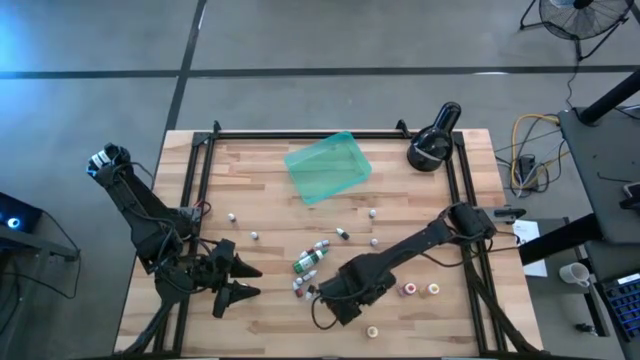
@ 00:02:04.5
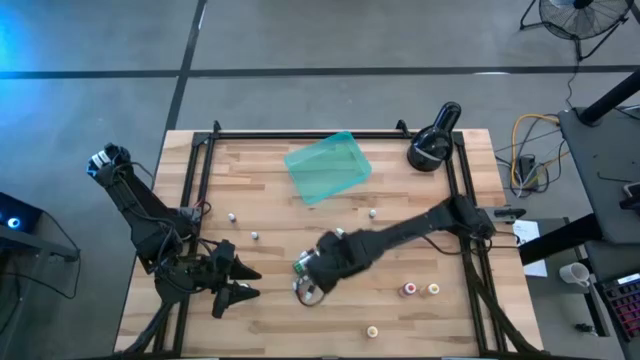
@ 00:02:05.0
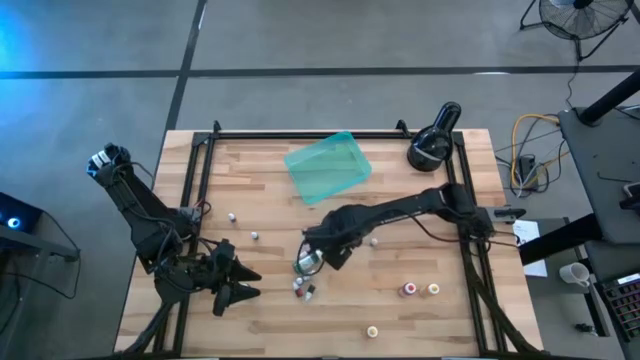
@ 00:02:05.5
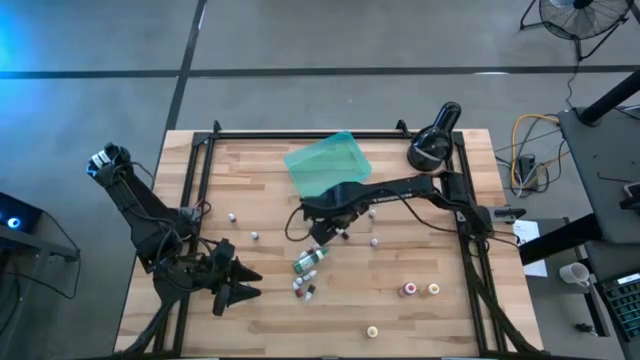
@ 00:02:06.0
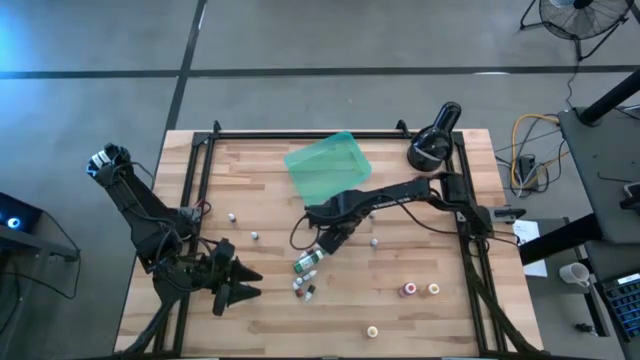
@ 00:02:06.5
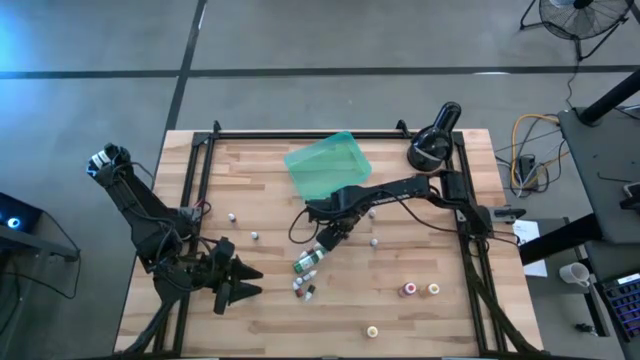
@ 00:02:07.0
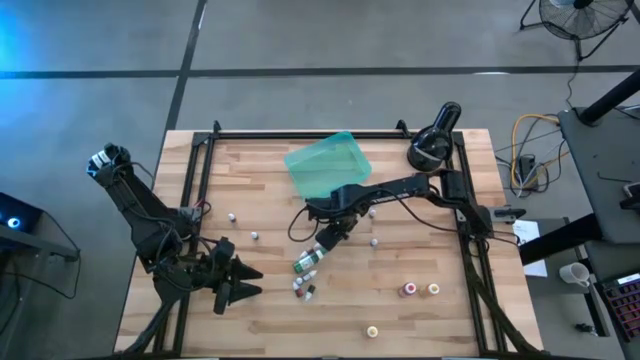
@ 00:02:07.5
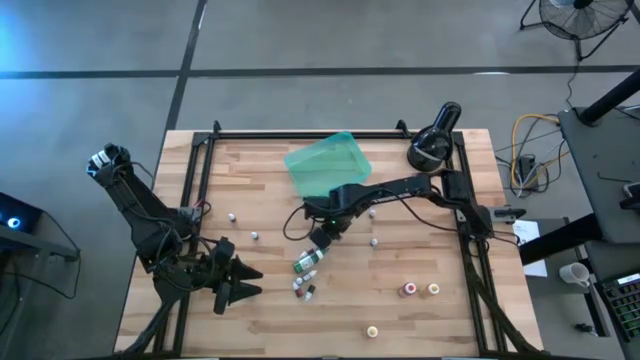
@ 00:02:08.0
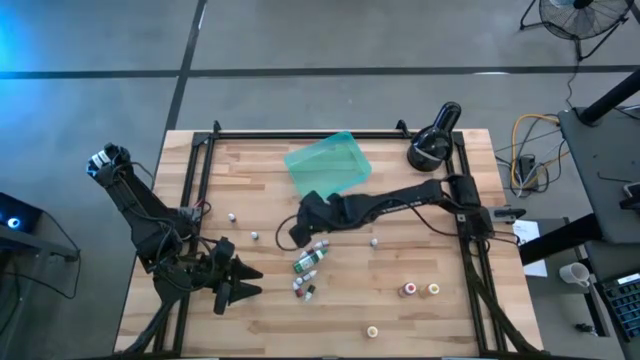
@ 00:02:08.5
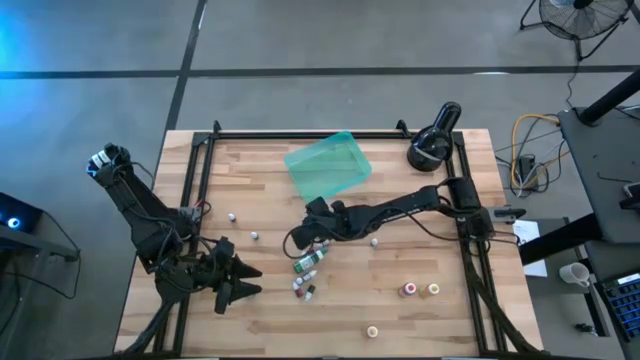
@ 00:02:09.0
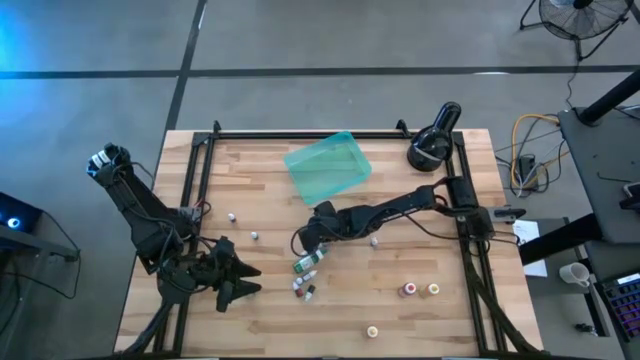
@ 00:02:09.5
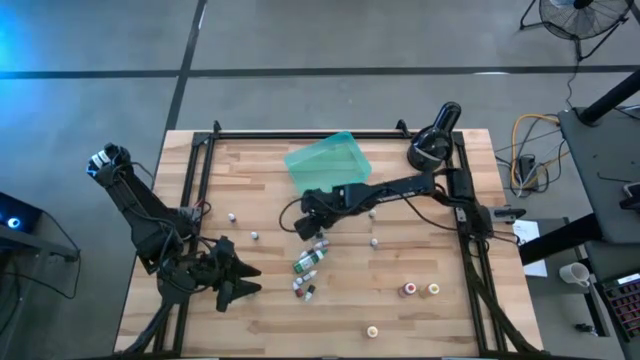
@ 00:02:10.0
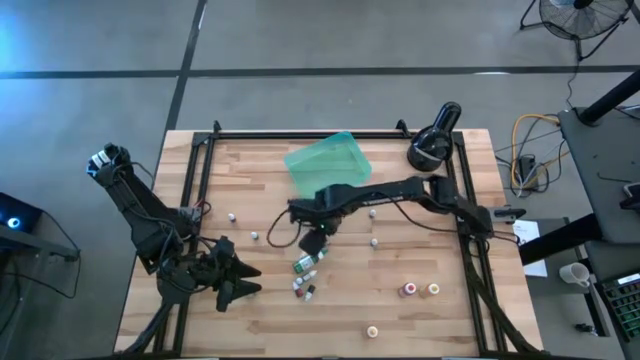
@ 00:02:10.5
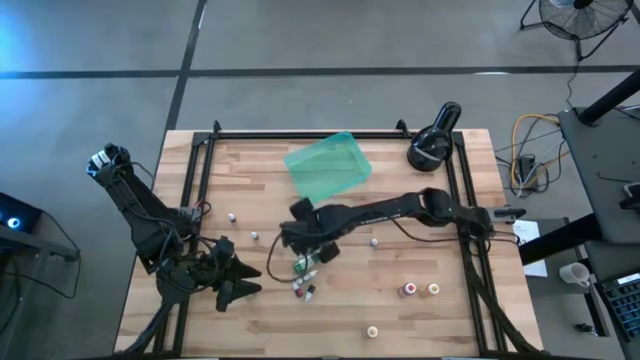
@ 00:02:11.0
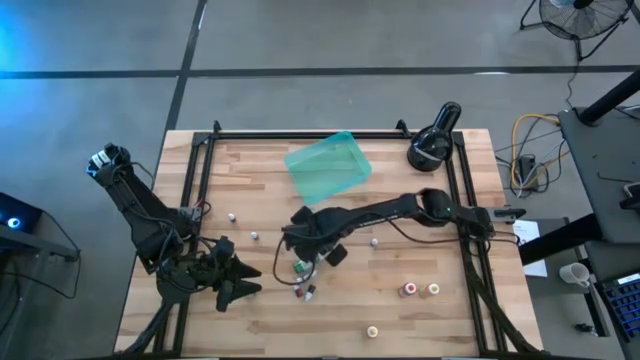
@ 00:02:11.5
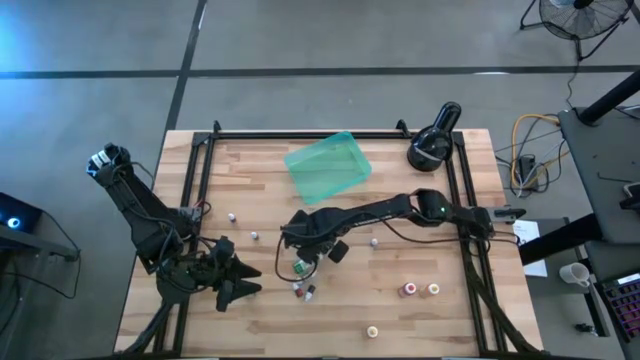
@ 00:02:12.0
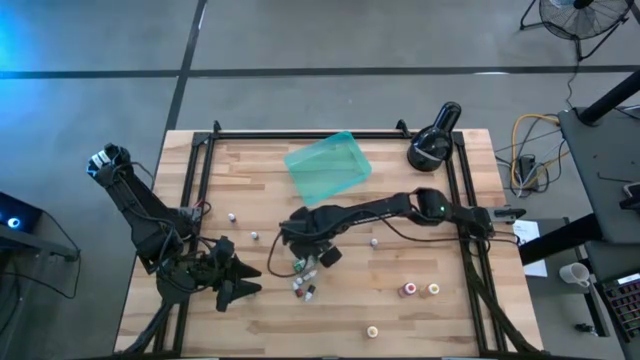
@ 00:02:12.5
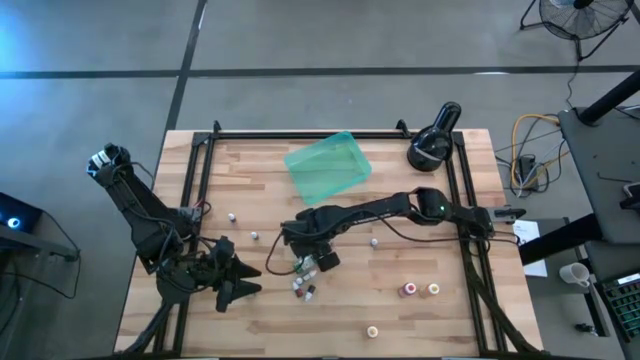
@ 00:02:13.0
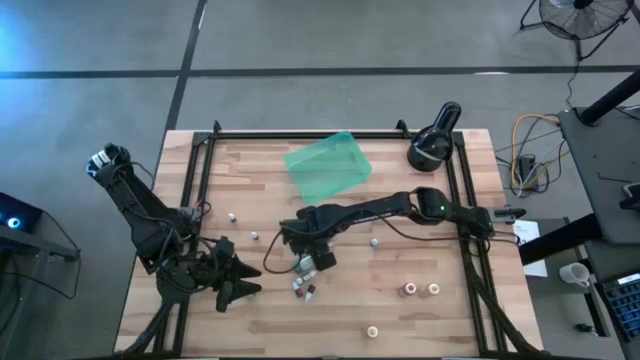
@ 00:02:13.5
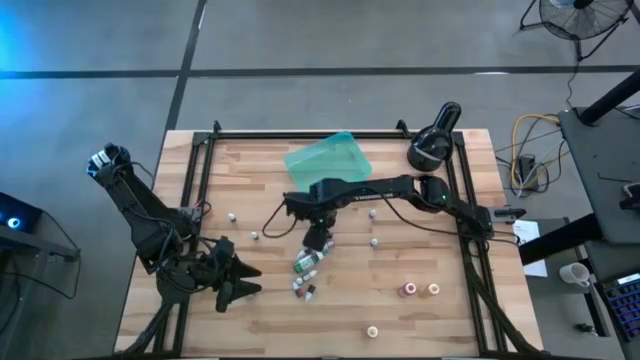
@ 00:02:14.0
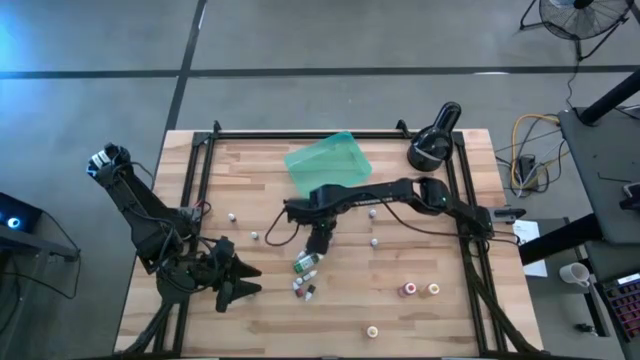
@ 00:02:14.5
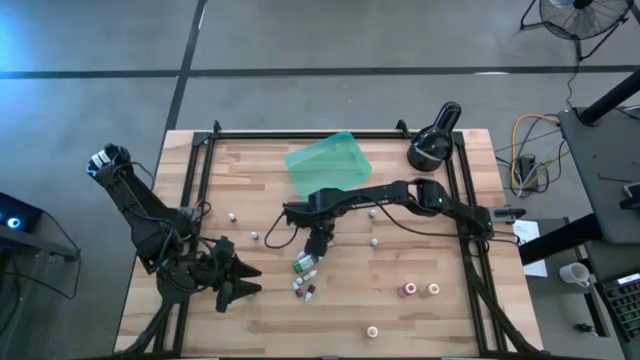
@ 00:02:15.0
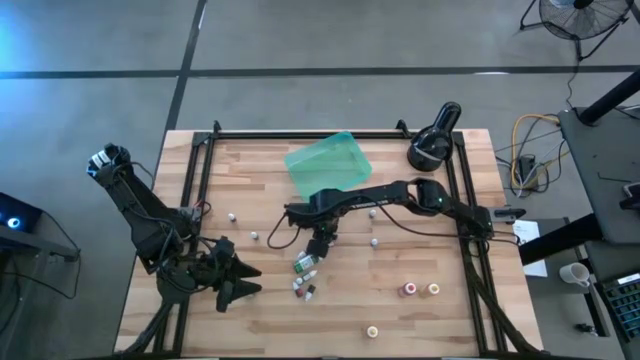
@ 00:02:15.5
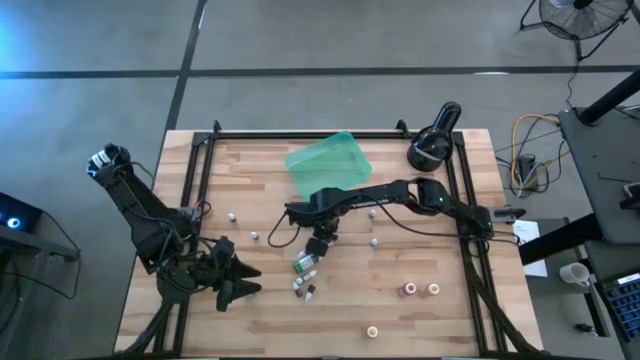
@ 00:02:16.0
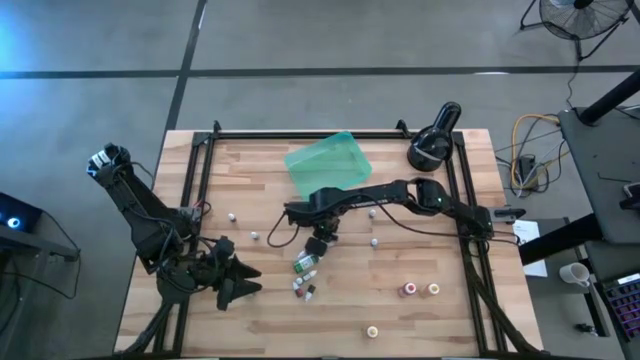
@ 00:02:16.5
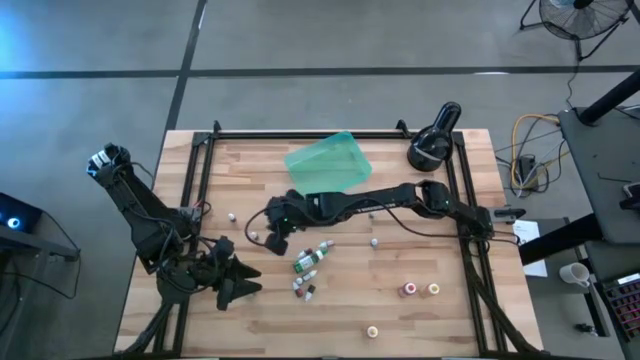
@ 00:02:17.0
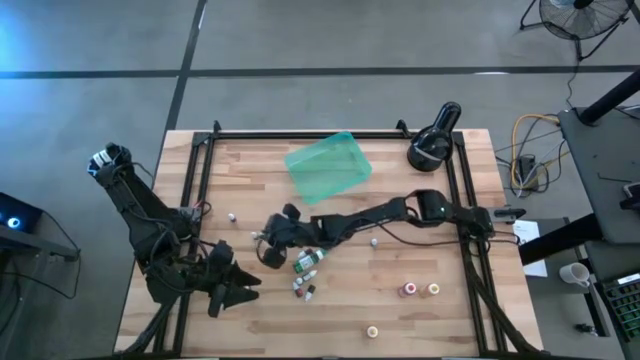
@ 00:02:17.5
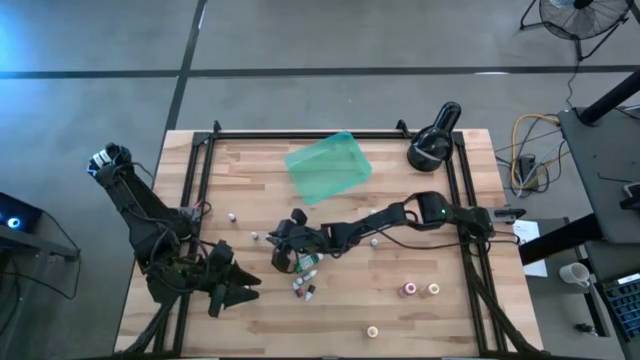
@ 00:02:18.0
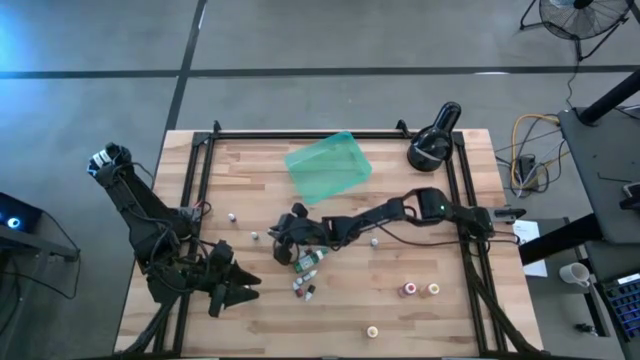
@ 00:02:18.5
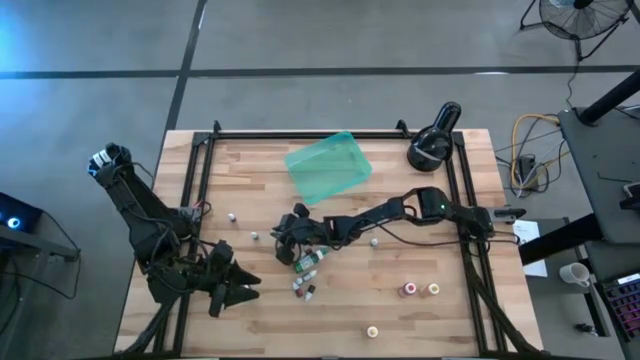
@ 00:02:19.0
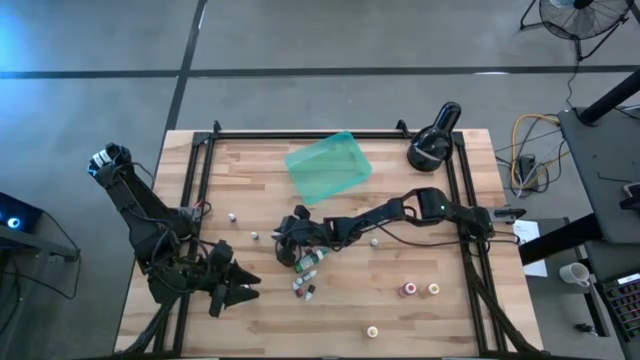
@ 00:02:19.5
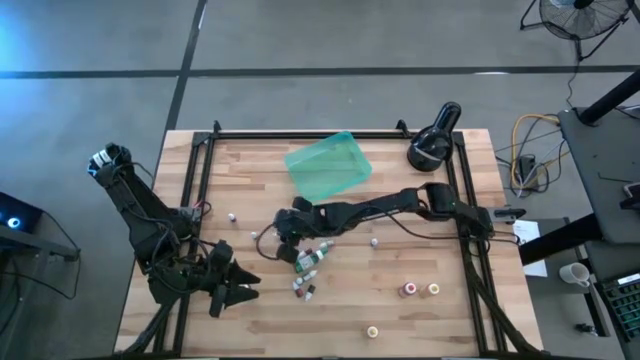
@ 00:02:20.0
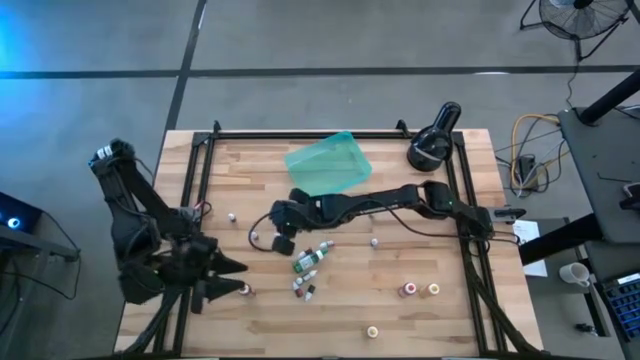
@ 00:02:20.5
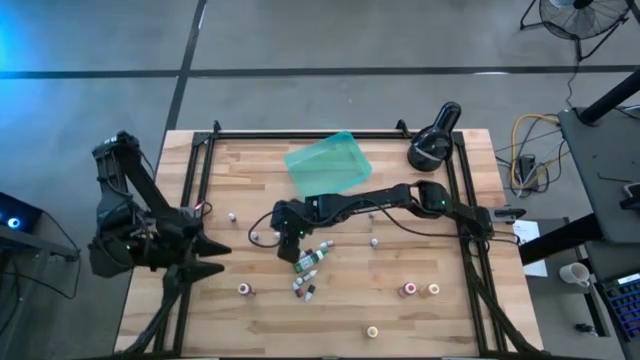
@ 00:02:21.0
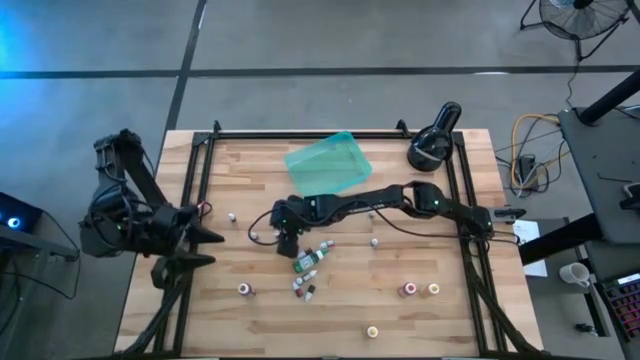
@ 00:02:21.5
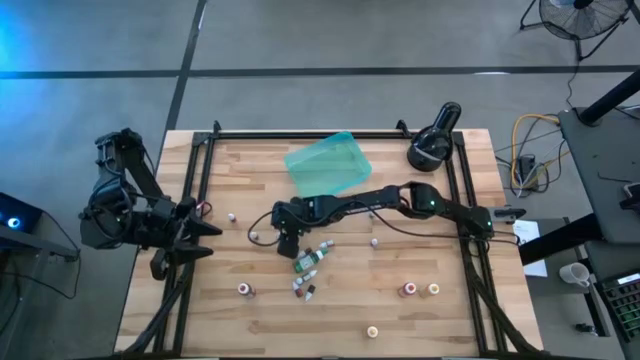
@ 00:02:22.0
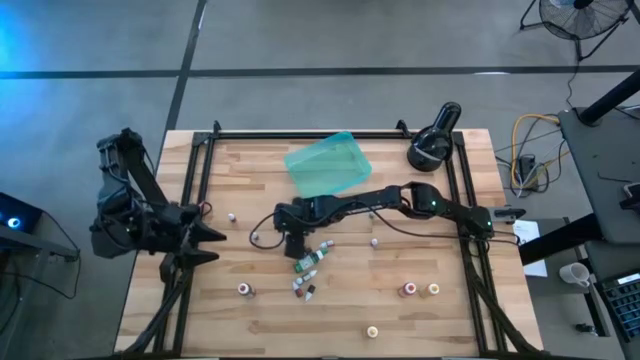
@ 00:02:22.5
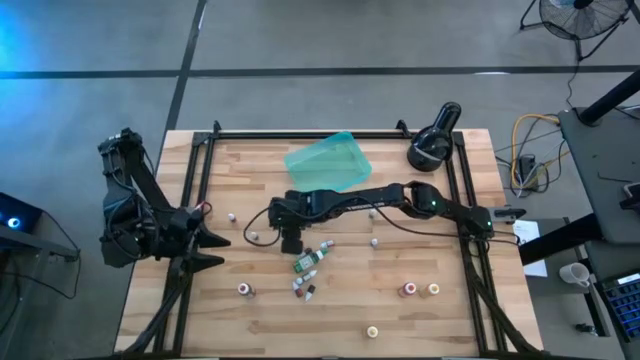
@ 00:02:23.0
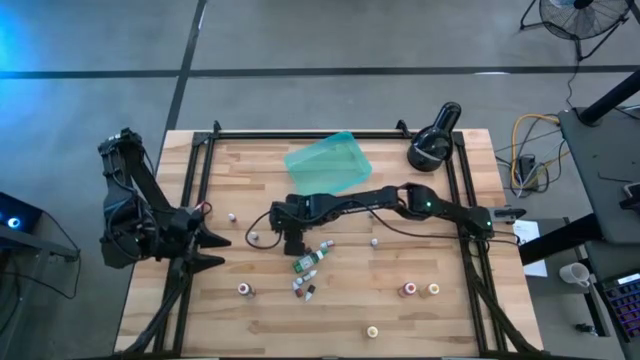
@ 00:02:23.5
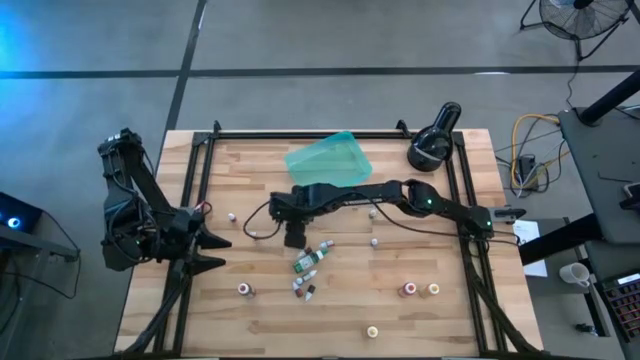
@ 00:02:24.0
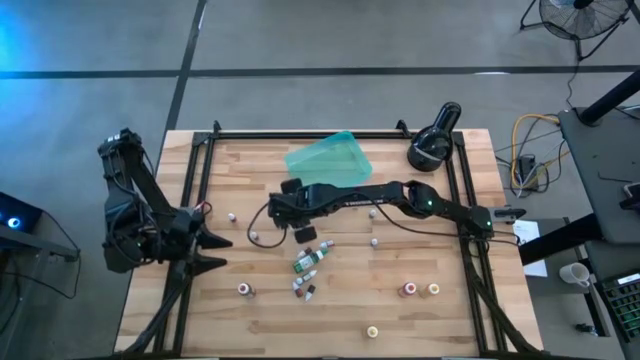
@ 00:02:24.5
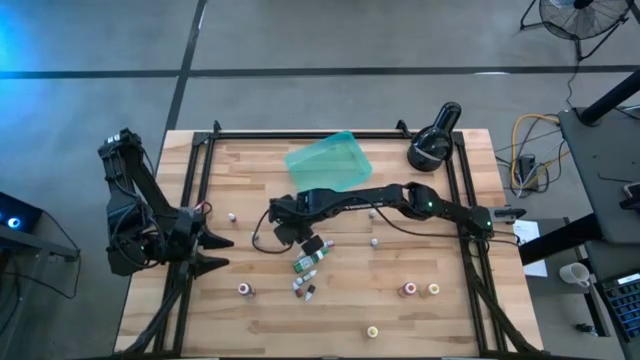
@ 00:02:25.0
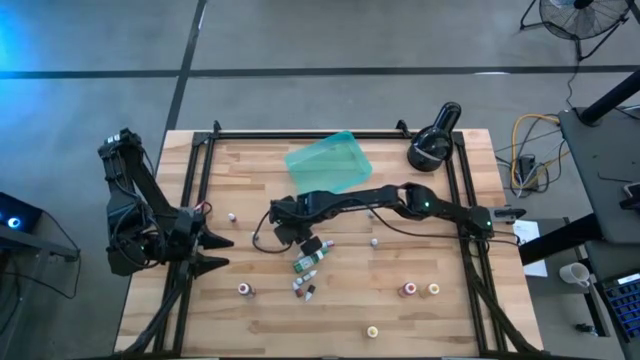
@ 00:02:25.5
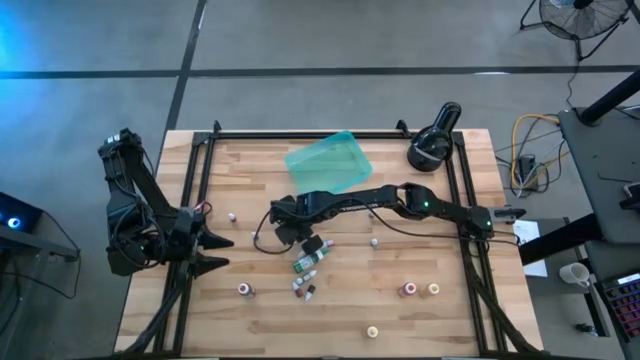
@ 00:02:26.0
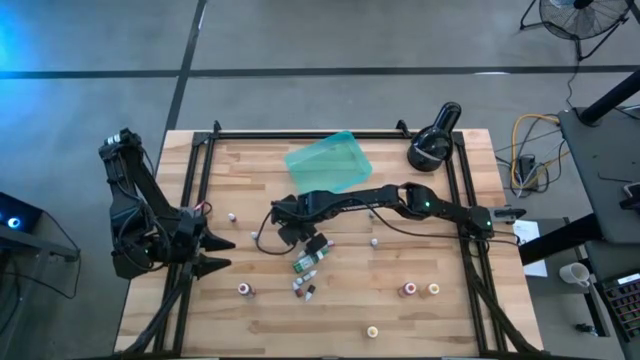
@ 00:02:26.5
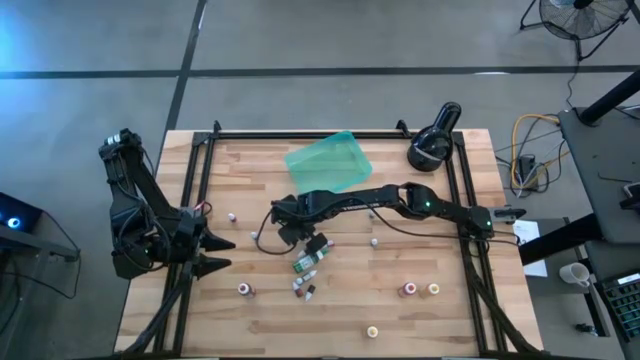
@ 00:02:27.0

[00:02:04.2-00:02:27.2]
Task: Pick & Place food coloring
Adjust the yellow small food coloring bottle
